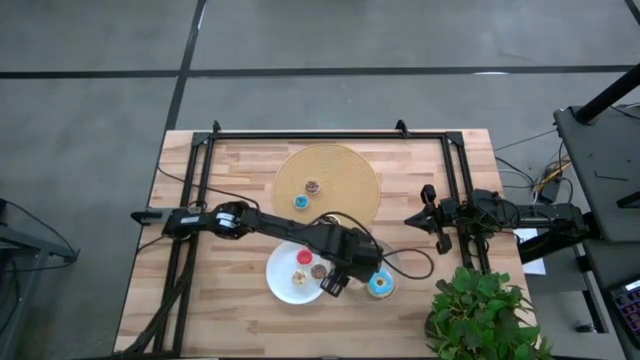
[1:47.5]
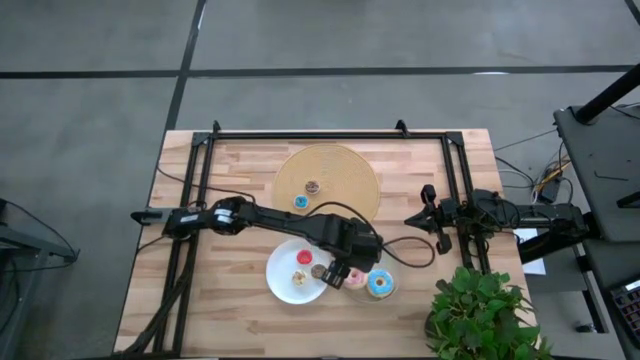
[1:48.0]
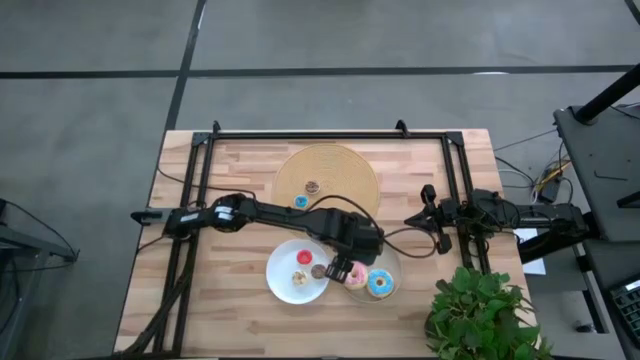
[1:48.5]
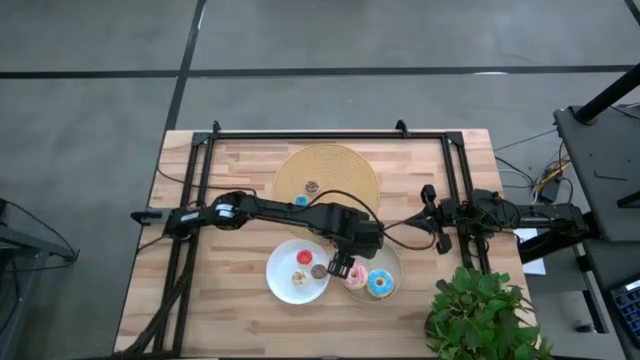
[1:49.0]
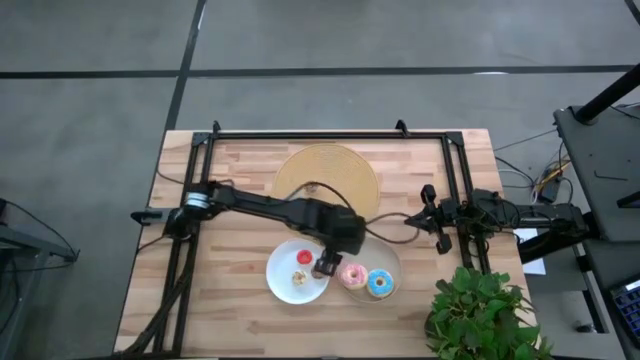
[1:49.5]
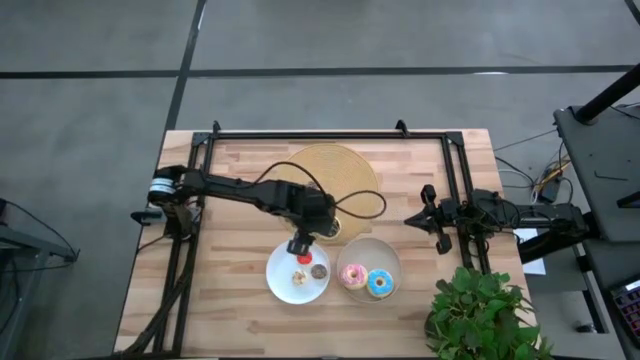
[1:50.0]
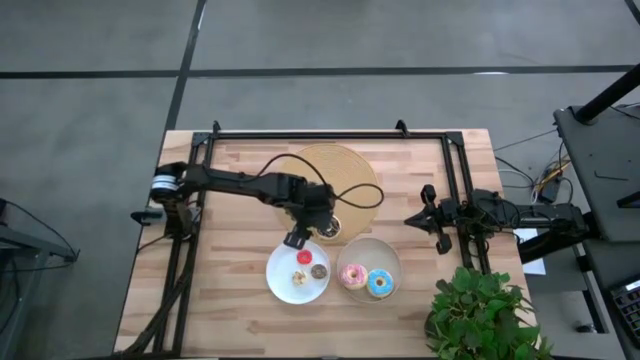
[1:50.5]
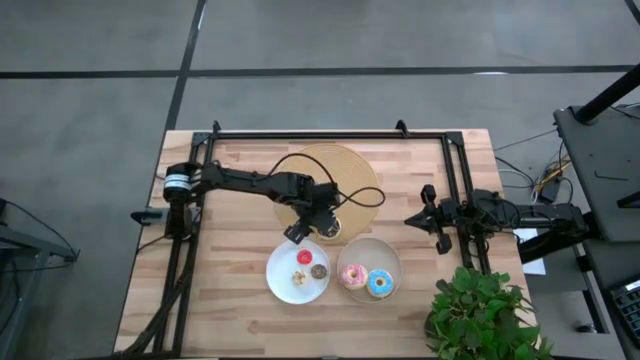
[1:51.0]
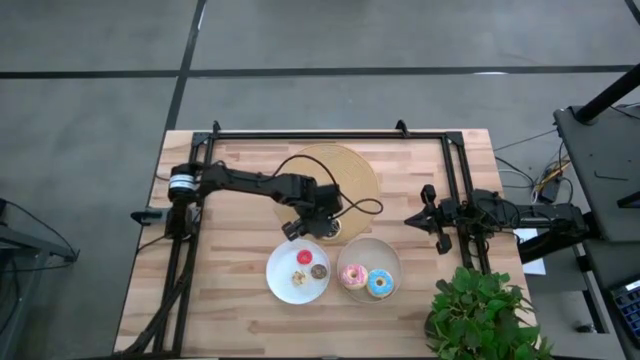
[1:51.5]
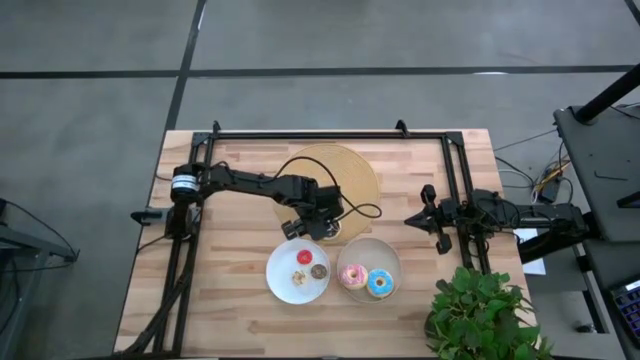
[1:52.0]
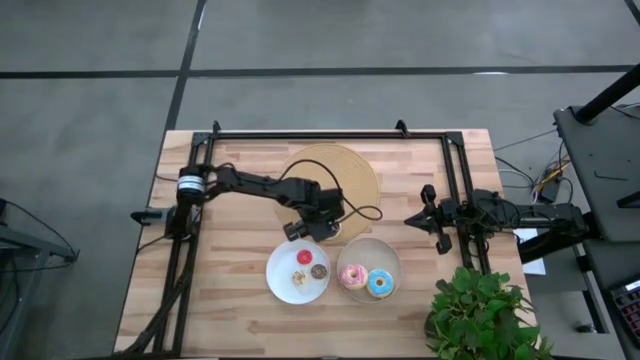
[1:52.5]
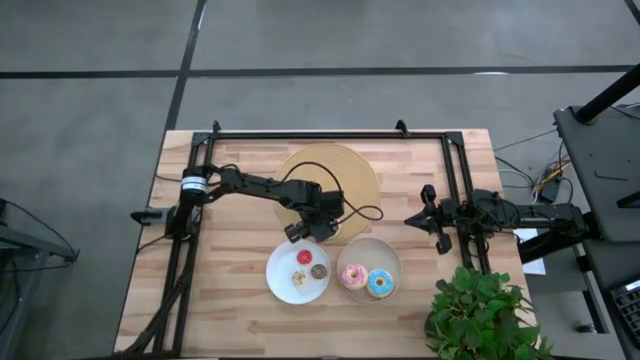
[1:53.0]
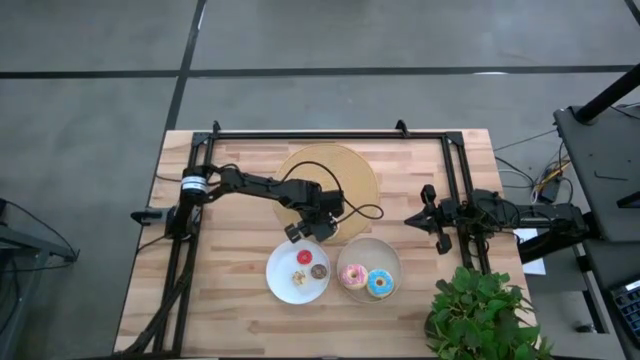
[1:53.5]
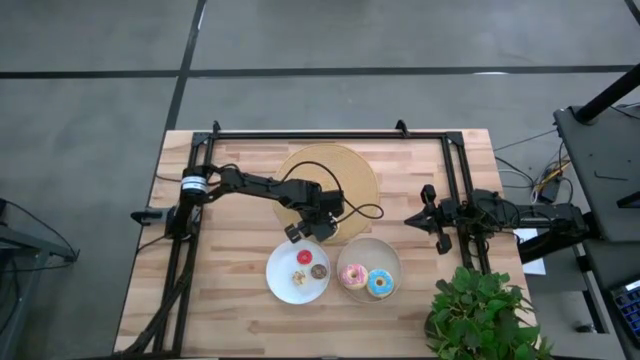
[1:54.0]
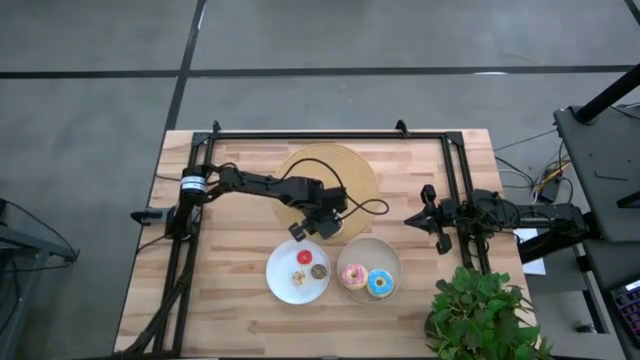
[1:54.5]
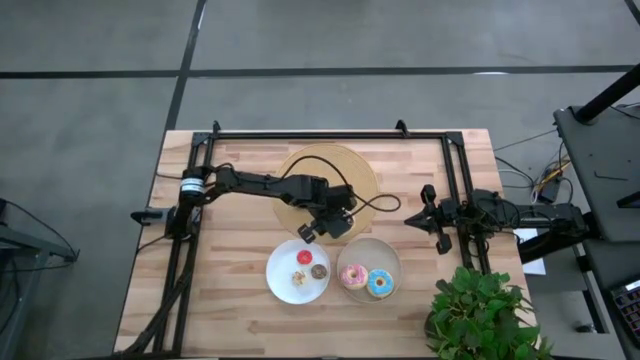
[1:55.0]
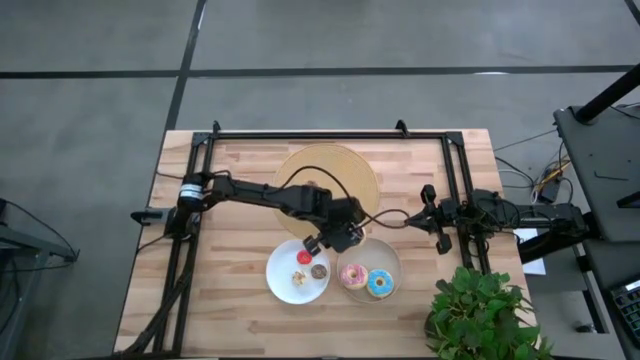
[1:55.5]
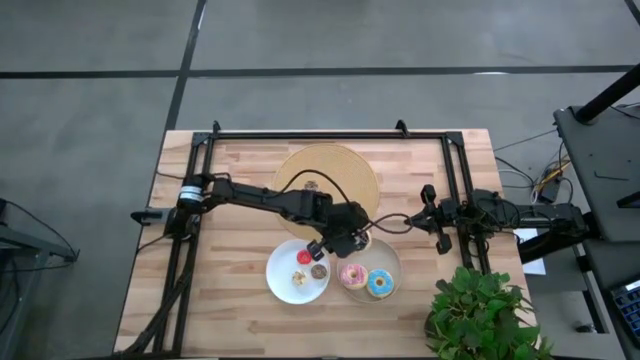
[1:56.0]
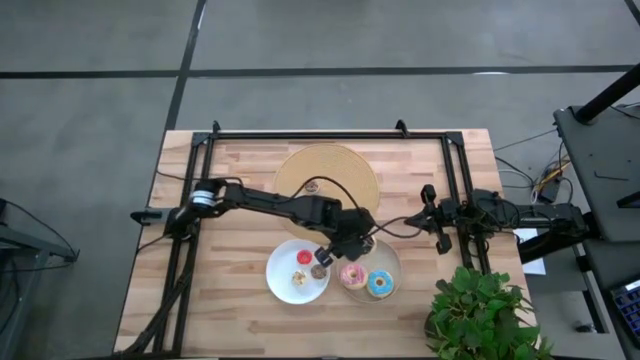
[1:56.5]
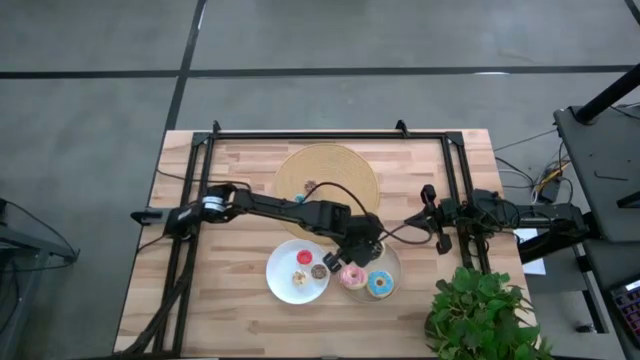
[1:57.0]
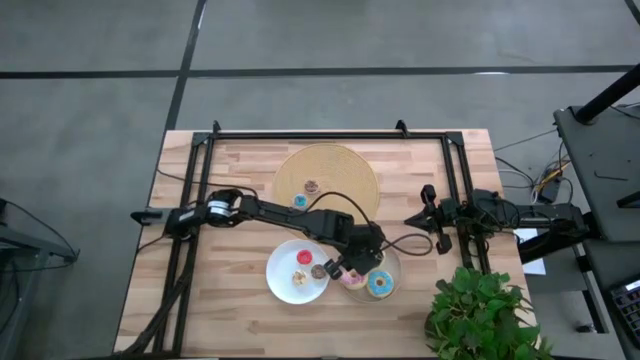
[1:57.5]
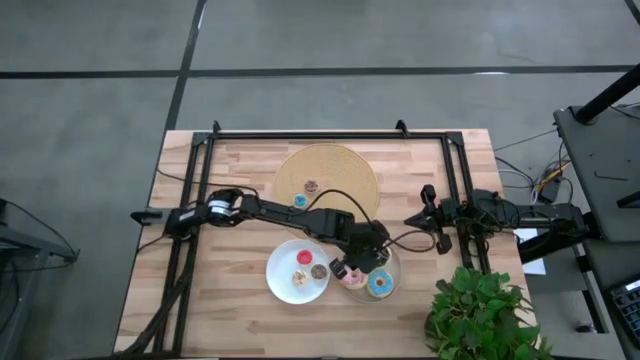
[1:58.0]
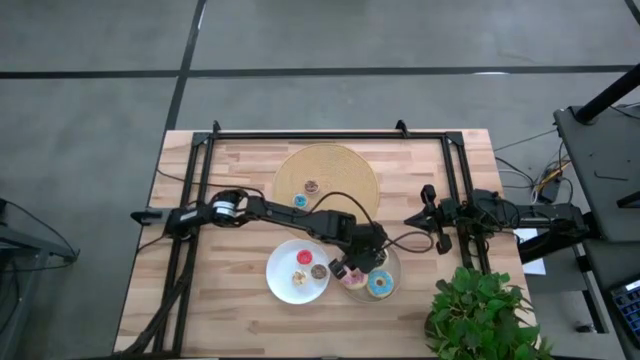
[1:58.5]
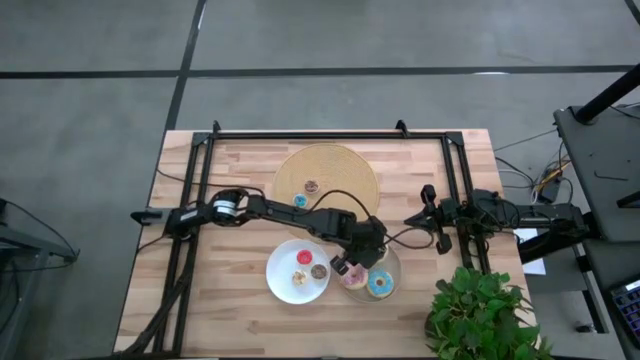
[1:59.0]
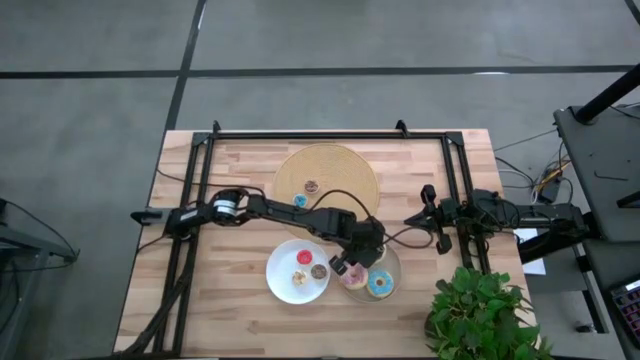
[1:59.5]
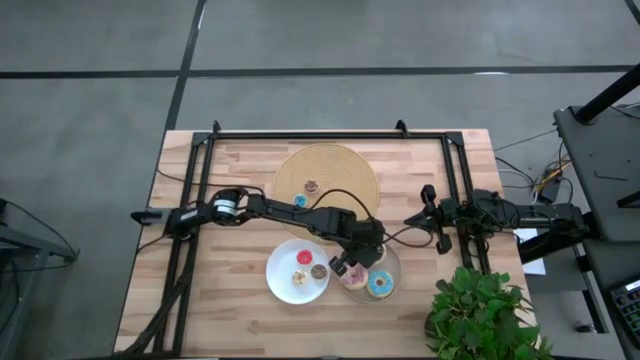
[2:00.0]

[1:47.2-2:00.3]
Task: Pick & Place donuts
Put the big black donut on the brown plate

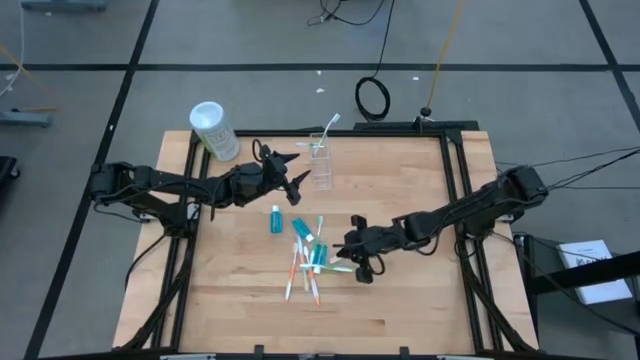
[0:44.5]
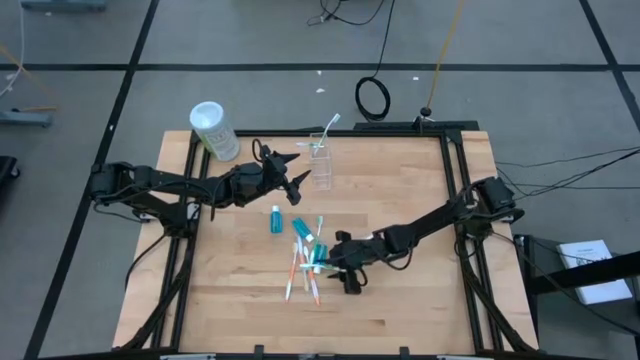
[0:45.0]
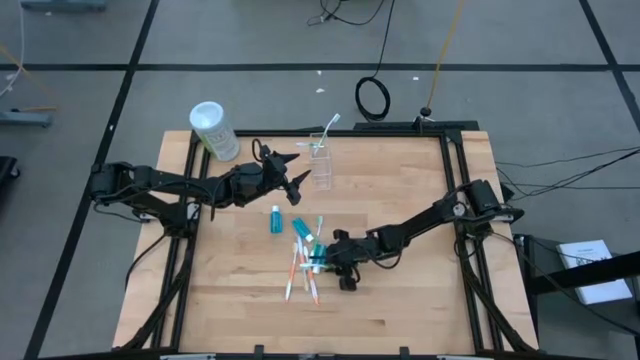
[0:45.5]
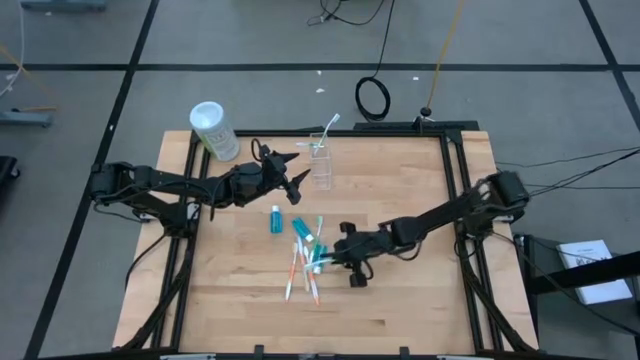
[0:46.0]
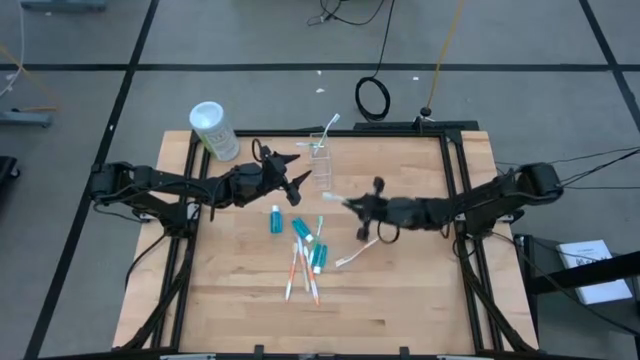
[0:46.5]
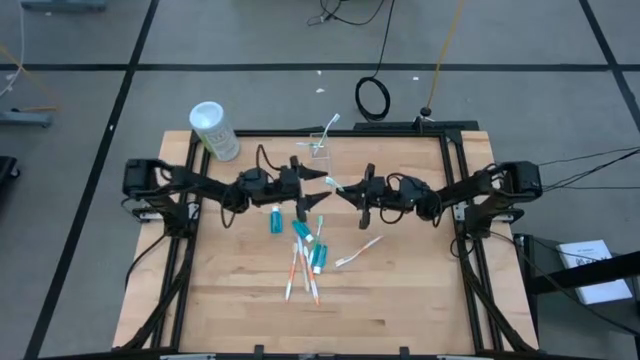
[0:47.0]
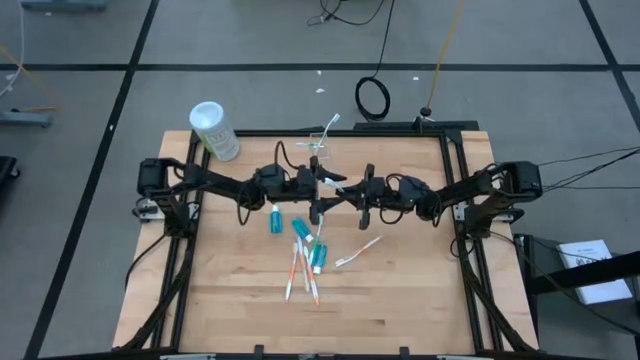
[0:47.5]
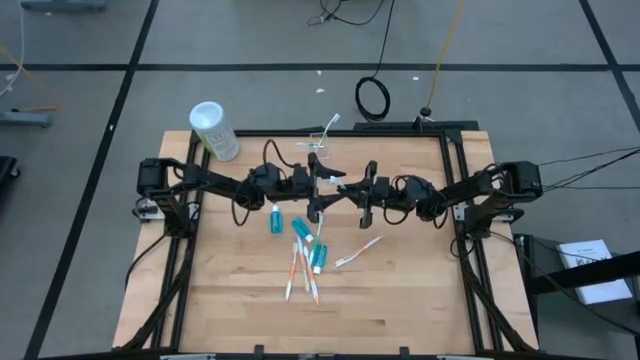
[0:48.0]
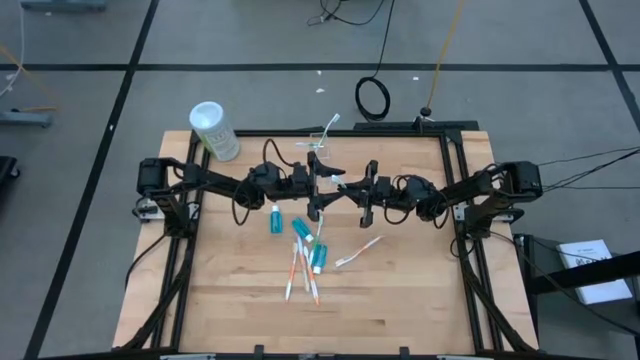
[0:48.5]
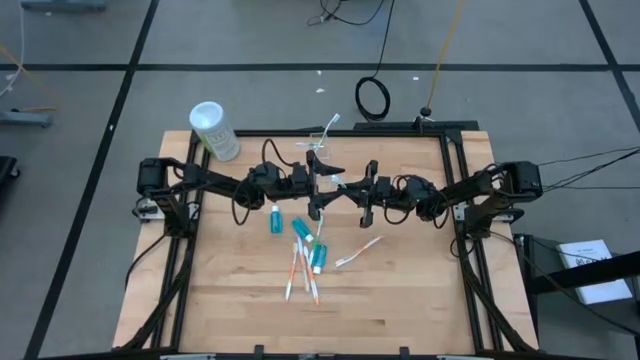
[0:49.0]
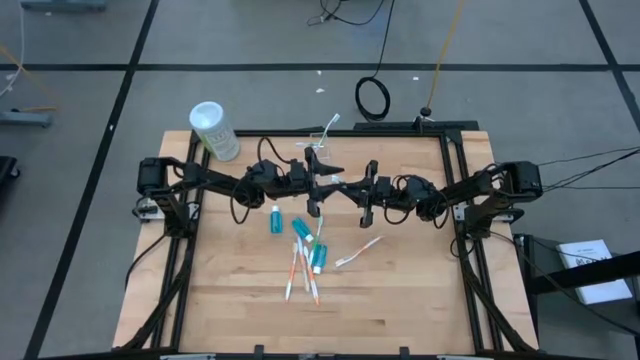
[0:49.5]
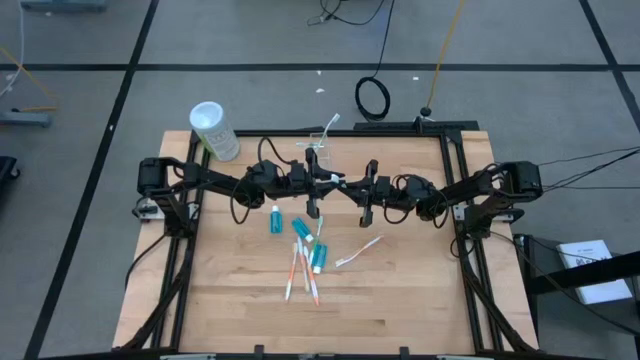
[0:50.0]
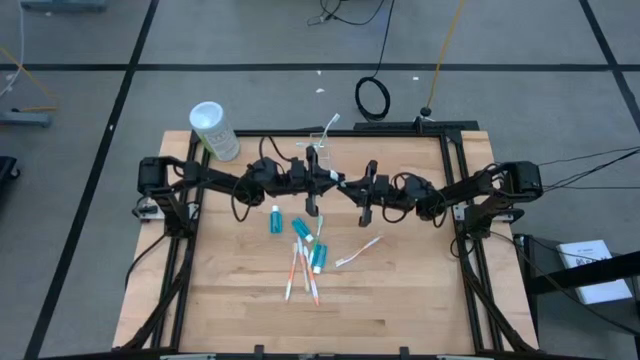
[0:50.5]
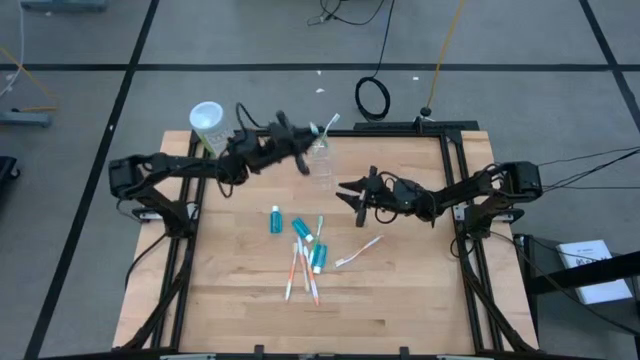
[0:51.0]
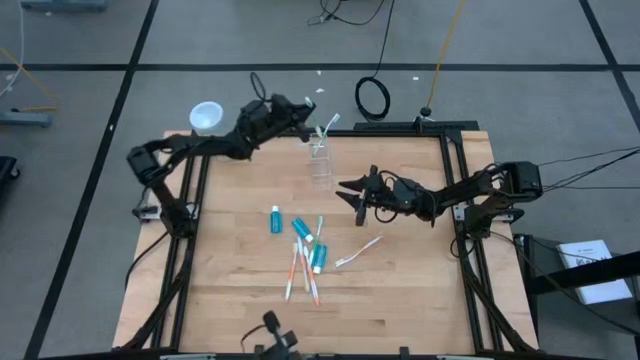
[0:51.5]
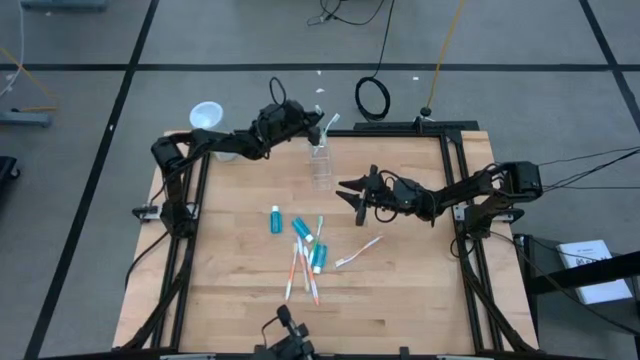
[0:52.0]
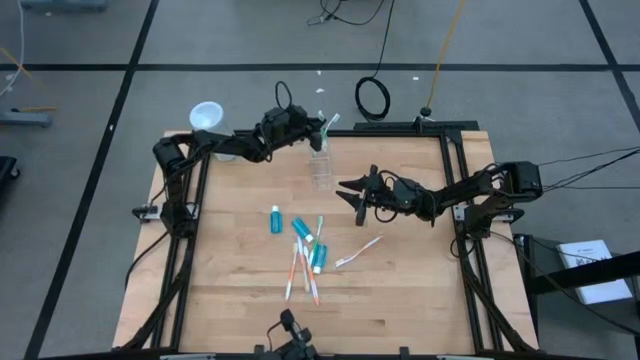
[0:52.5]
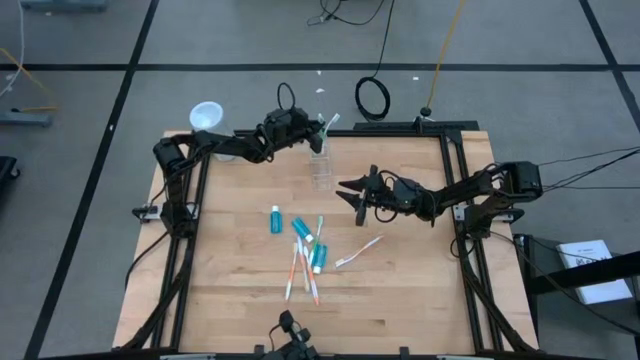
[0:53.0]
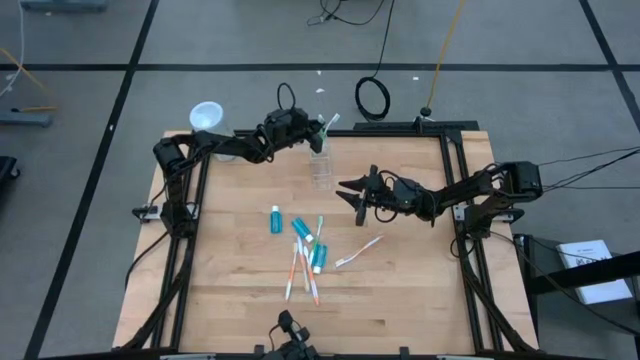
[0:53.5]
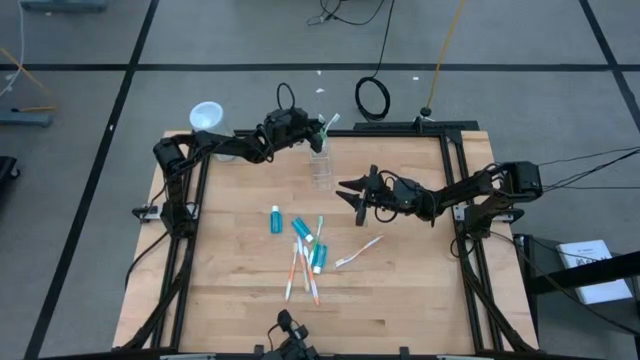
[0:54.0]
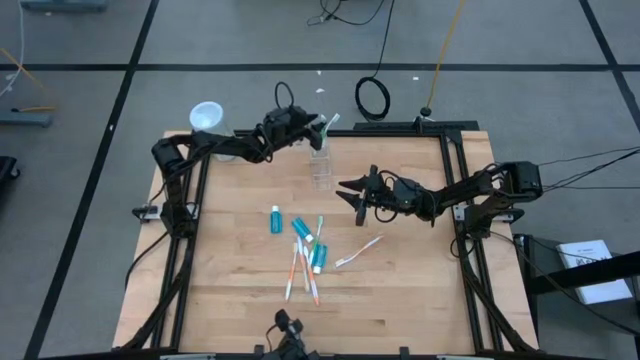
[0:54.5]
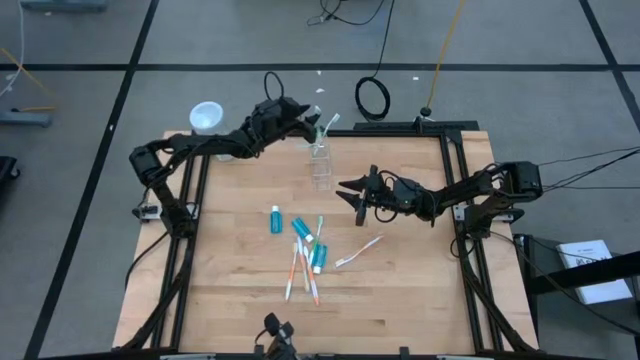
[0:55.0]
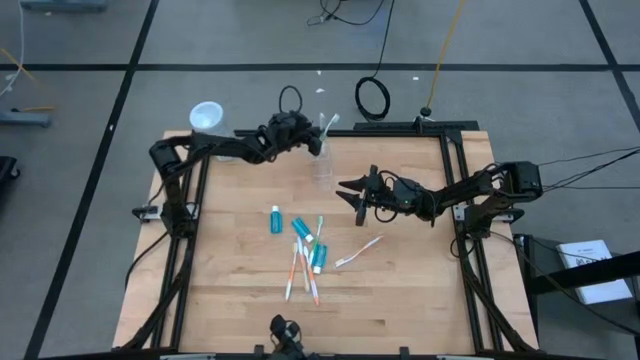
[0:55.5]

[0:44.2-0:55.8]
Task: Pick & Place toothbrushing station
Put the green toothbrush into the transparent organizer
